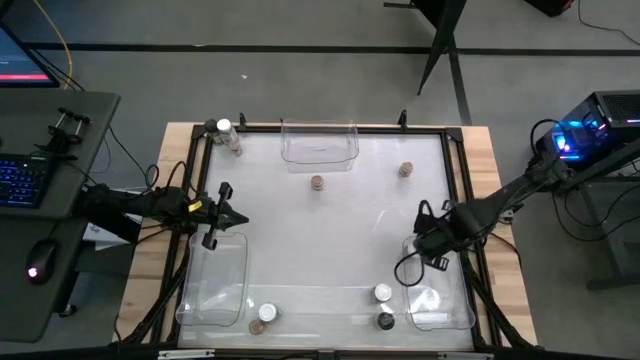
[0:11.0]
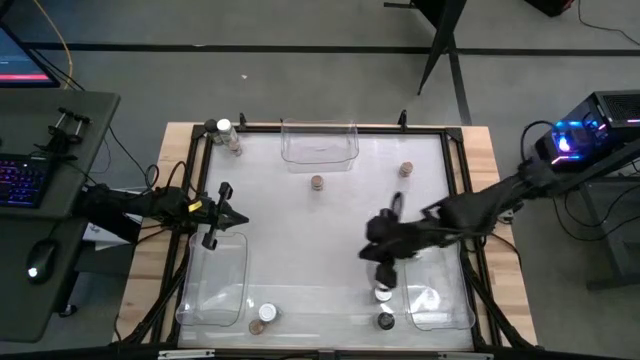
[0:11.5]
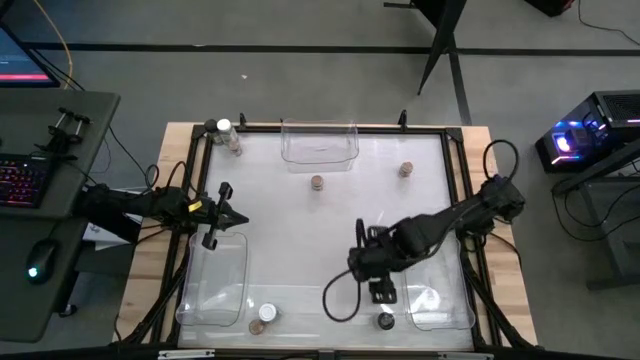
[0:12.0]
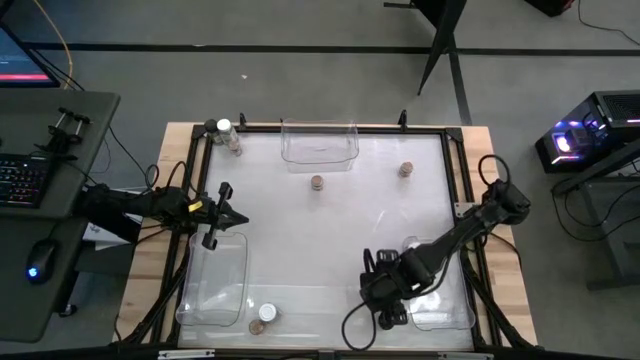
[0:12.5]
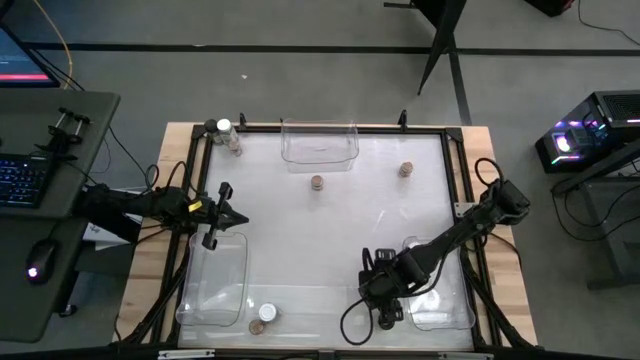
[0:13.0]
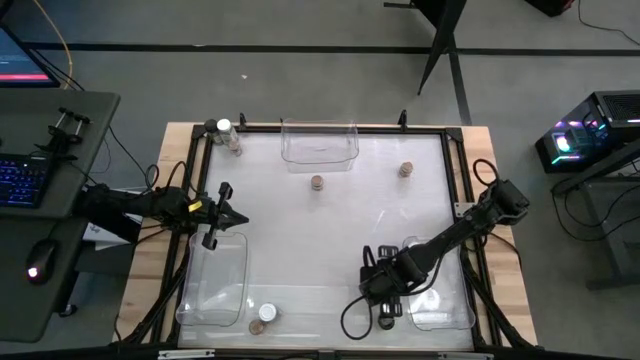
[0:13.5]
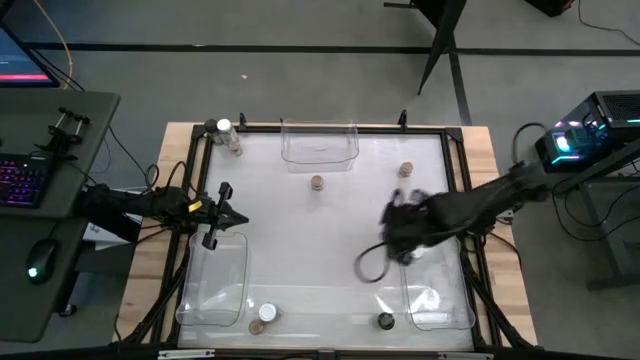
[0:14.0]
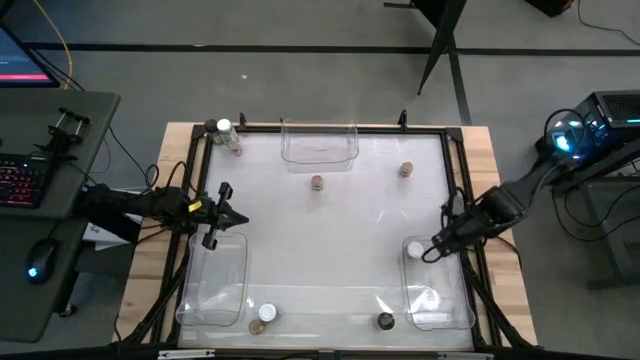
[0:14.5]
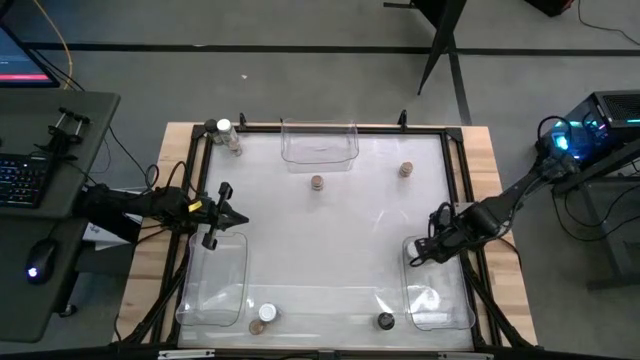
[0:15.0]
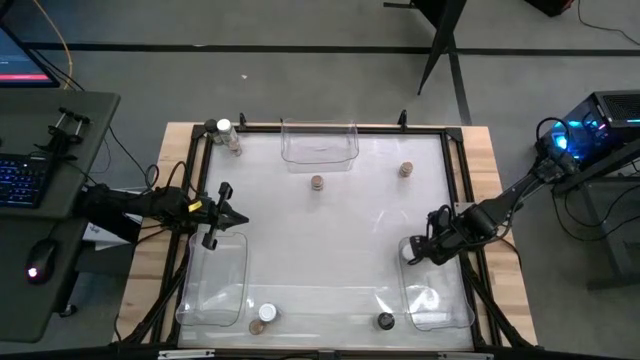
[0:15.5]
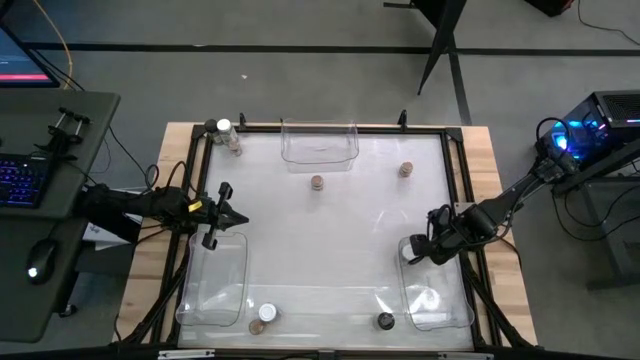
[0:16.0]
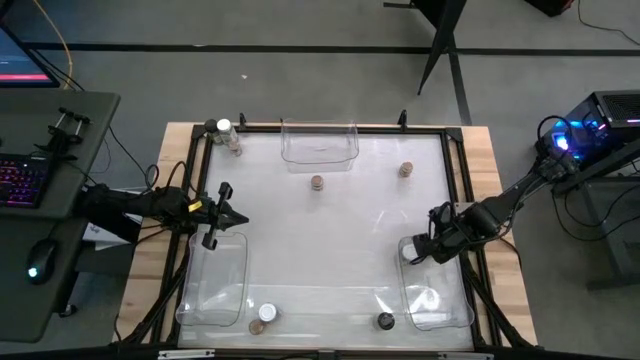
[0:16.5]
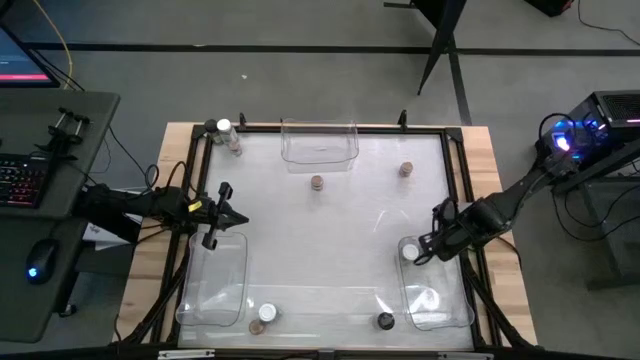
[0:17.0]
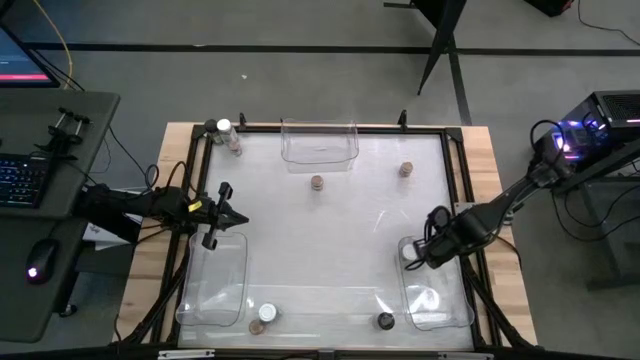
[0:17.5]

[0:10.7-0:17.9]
Task: Sort spices by type
Put the white seasoning bottle into the bottom right transparent bin

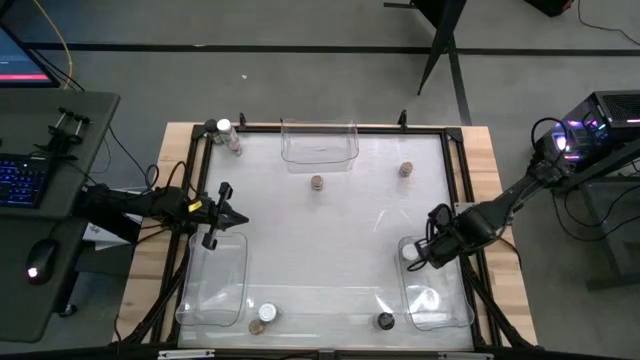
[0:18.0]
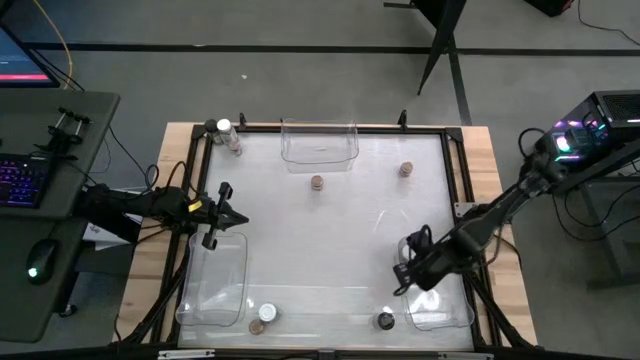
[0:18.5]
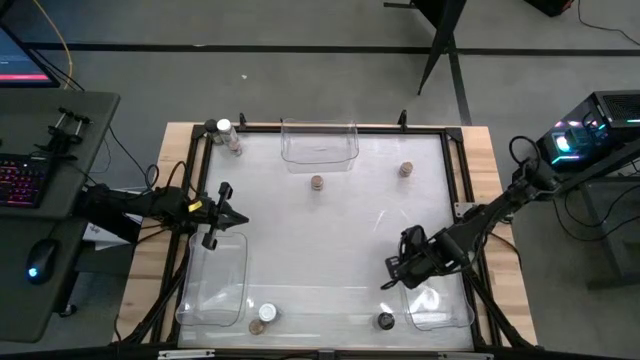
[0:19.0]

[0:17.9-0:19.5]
Adjust the white seasoning bottle inside the bottom right transparent bin

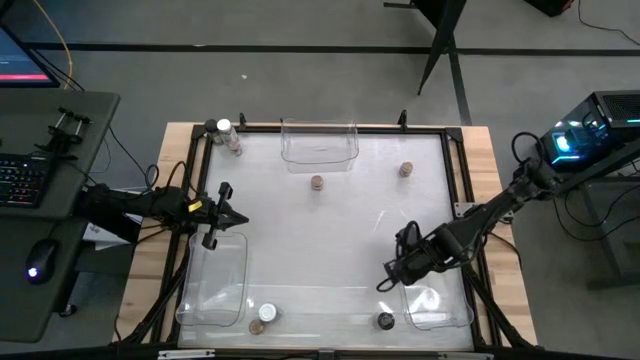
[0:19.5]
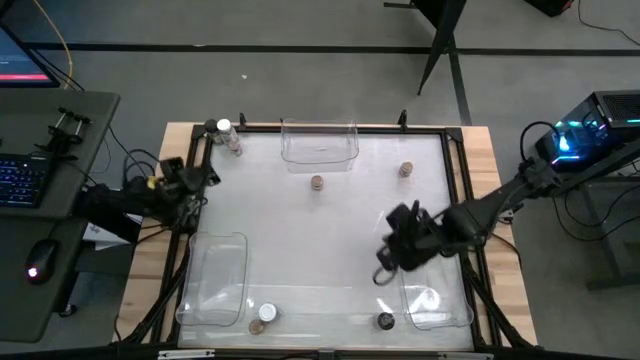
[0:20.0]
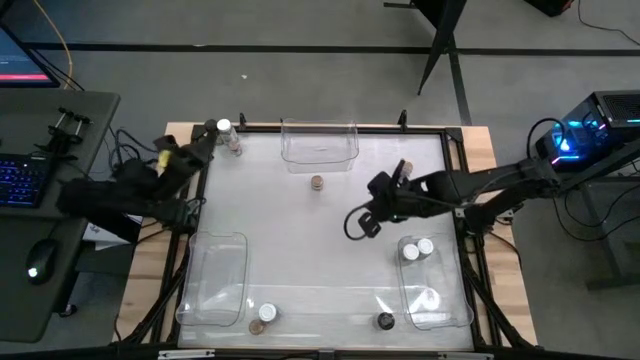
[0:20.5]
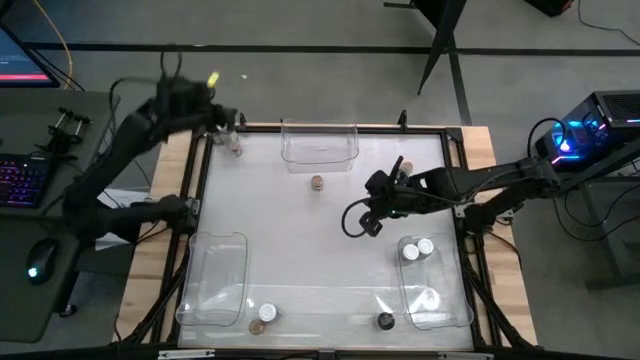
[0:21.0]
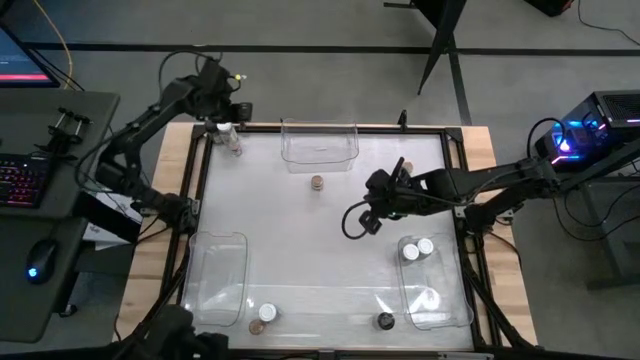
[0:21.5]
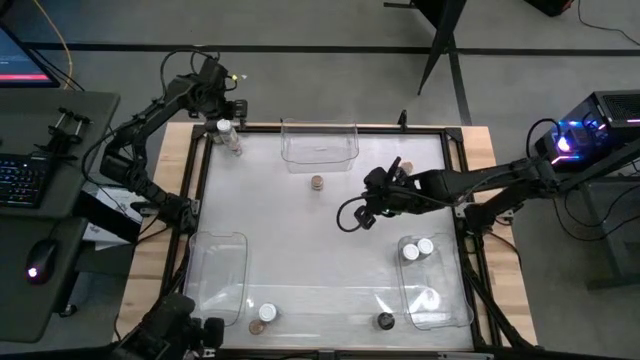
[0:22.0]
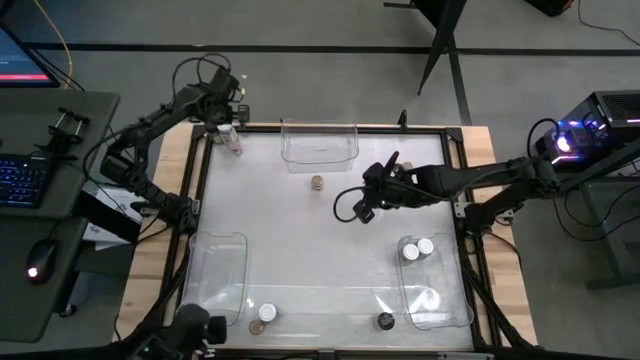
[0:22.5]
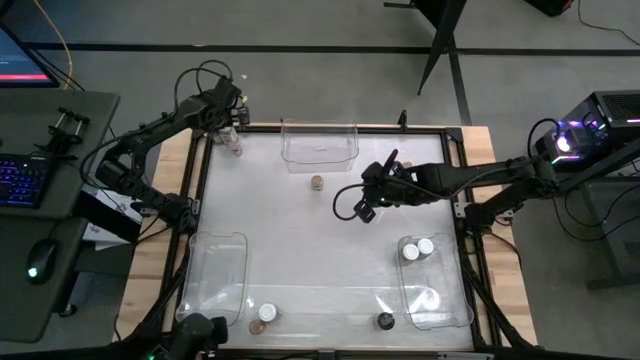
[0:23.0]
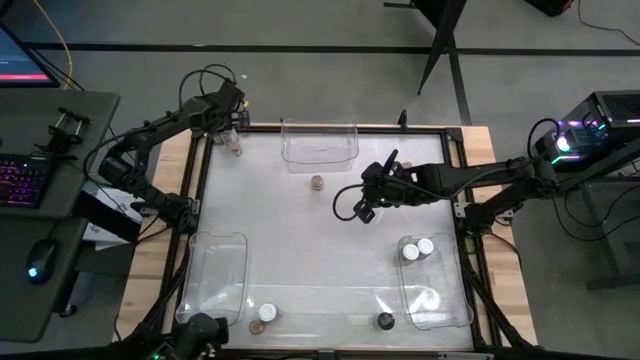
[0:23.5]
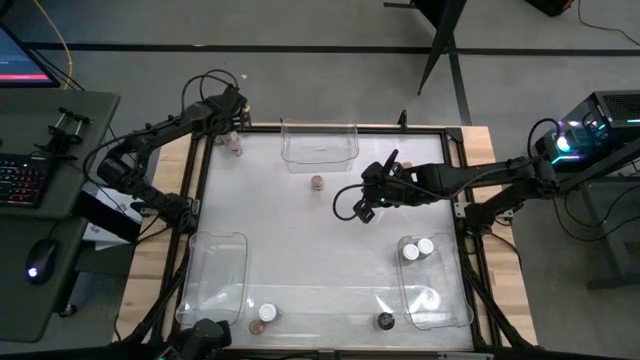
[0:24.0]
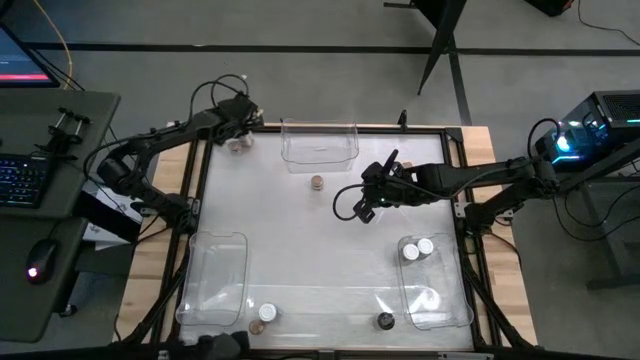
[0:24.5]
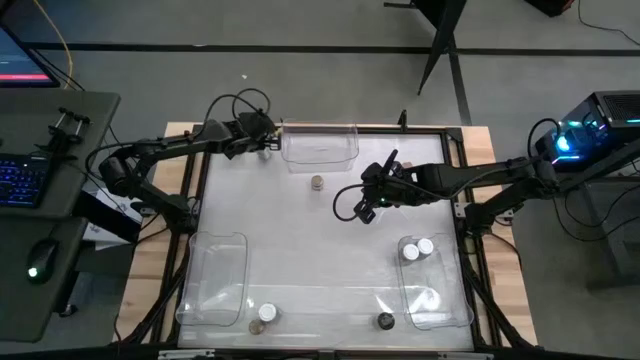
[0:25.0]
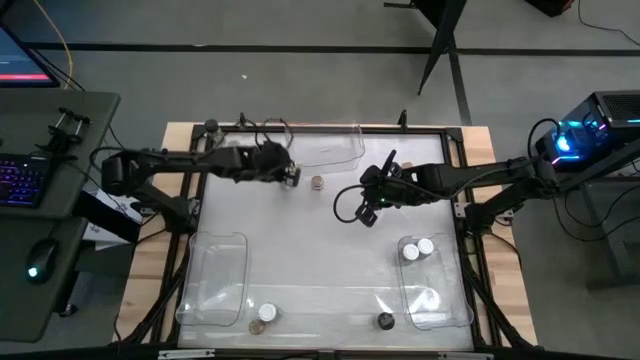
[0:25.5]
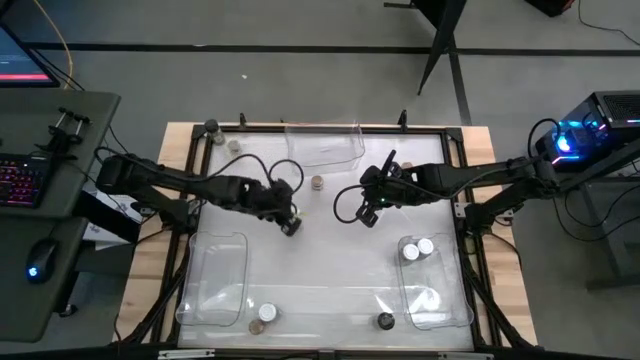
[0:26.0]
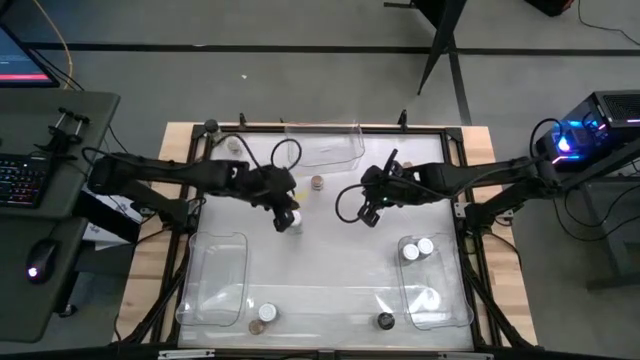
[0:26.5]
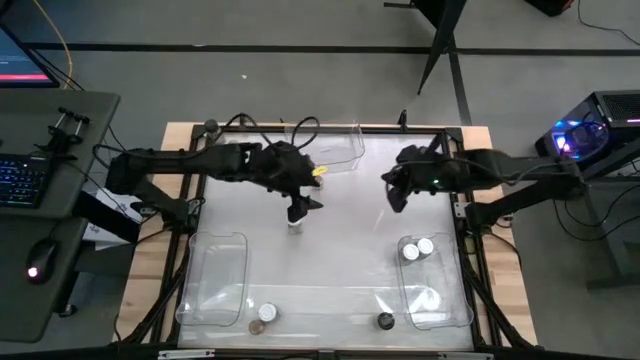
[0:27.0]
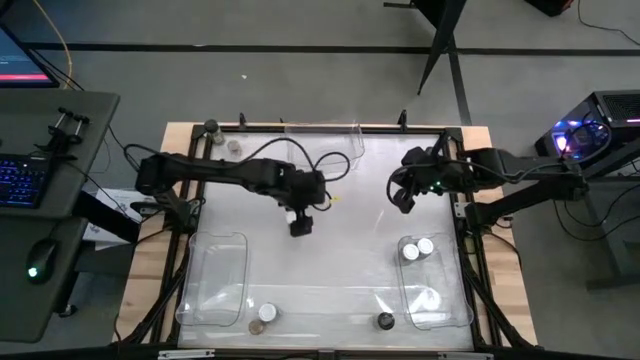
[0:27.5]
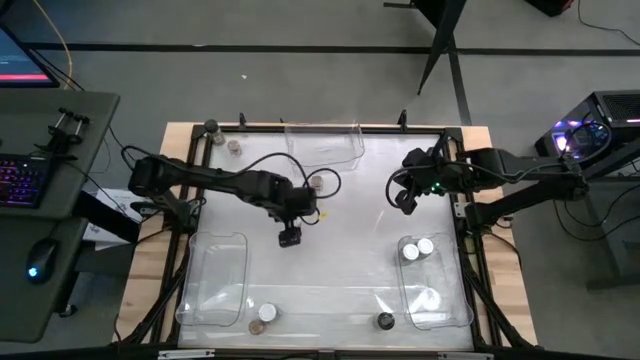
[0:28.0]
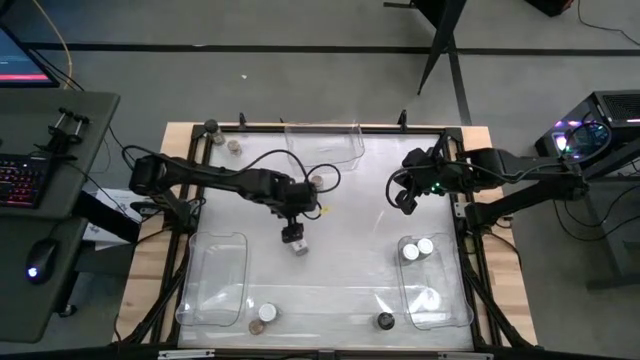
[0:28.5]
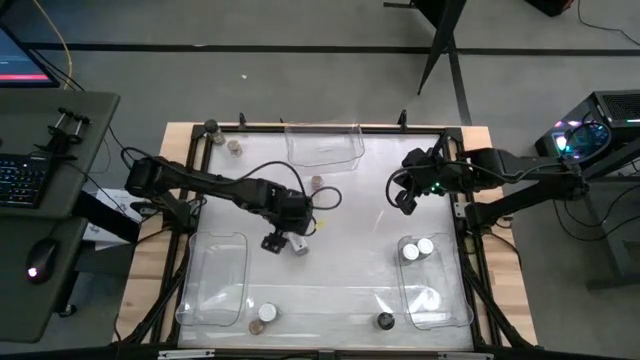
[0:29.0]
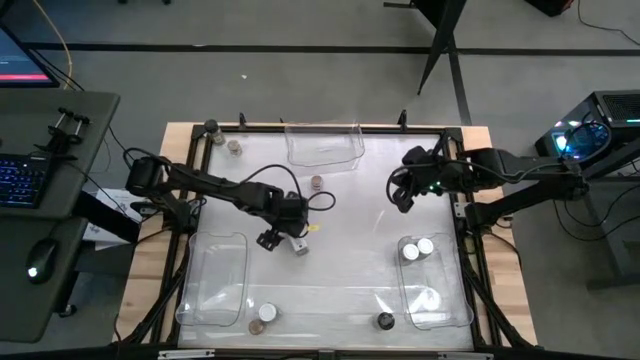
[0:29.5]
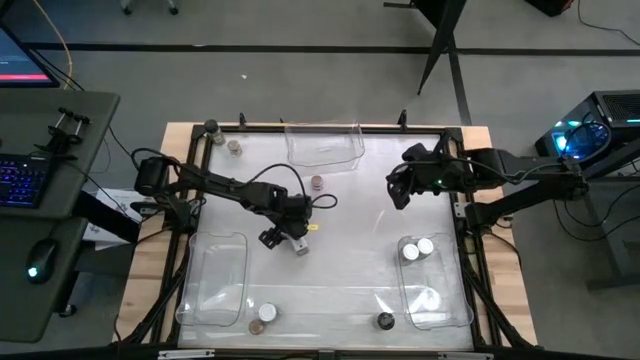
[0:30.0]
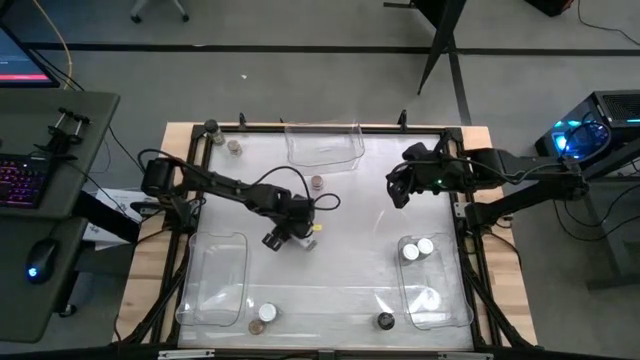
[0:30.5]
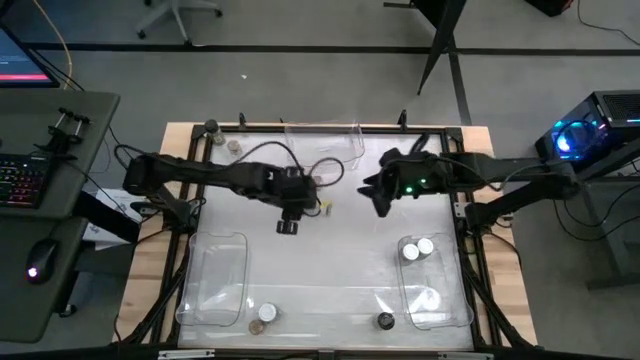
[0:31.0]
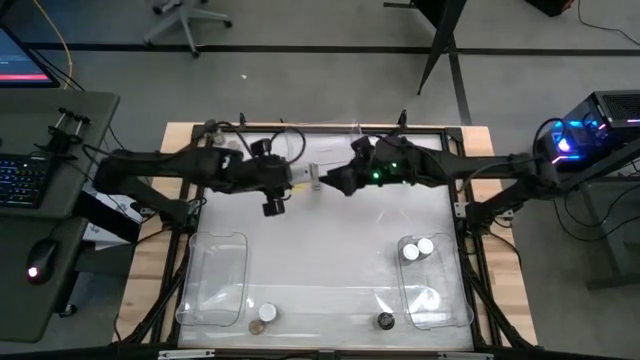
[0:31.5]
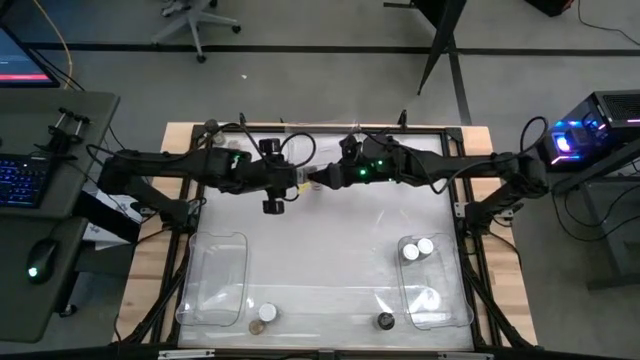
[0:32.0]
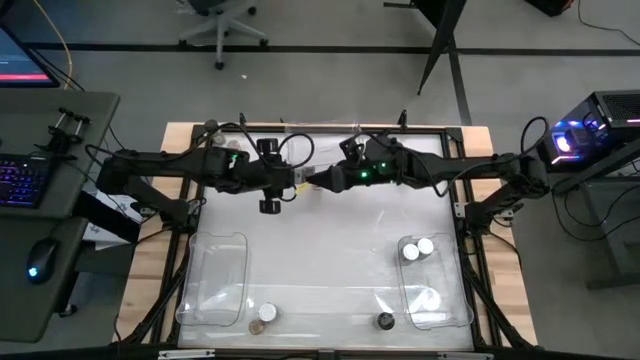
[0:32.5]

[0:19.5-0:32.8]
Put the white seasoning bottle into the bottom right transparent bin
